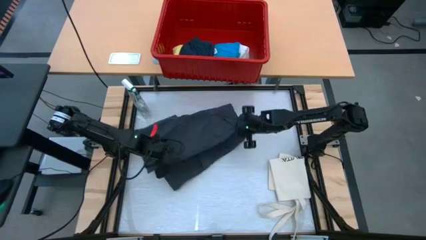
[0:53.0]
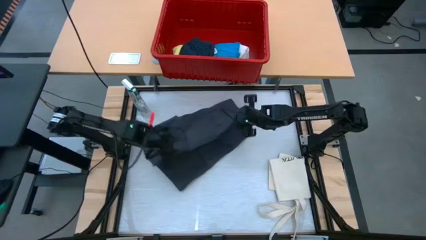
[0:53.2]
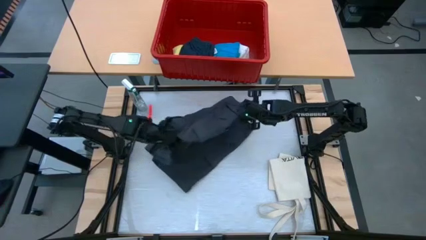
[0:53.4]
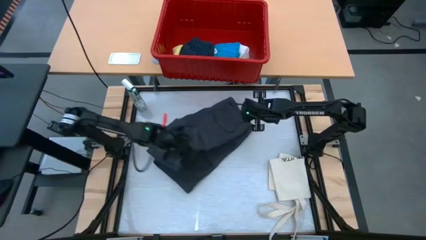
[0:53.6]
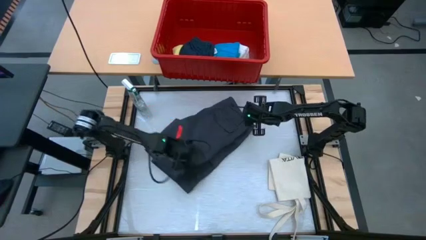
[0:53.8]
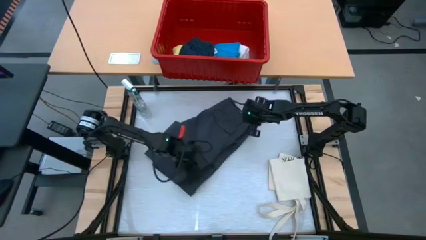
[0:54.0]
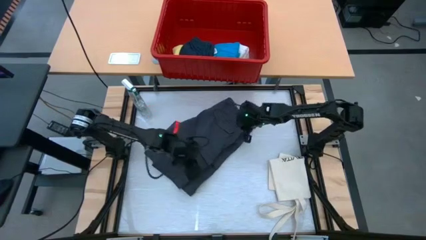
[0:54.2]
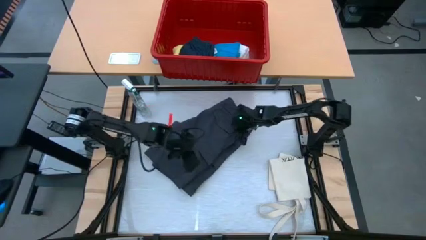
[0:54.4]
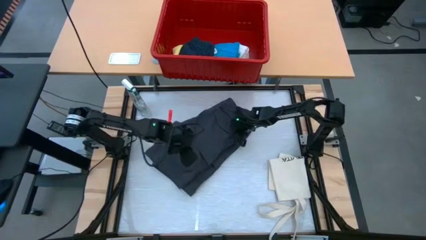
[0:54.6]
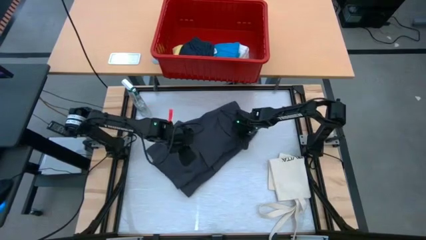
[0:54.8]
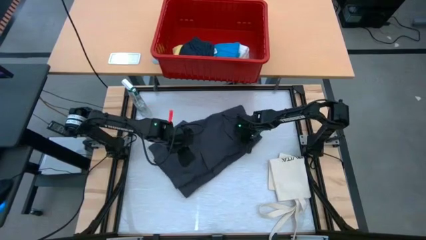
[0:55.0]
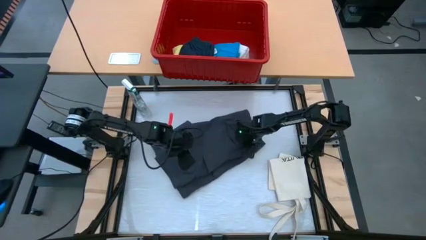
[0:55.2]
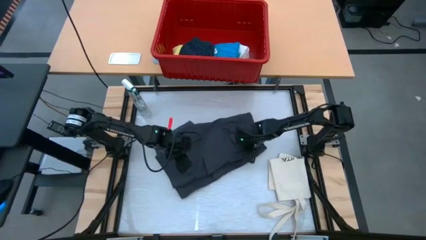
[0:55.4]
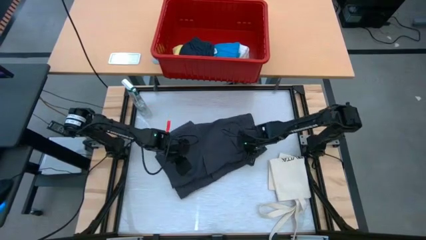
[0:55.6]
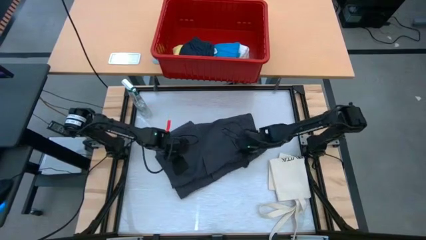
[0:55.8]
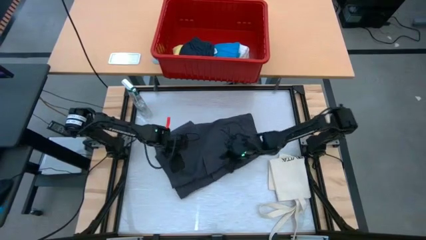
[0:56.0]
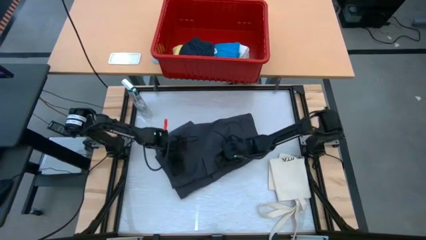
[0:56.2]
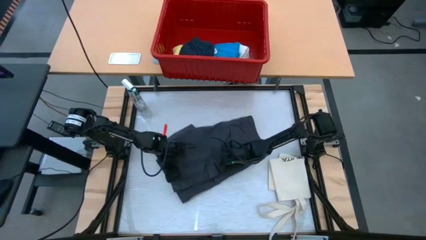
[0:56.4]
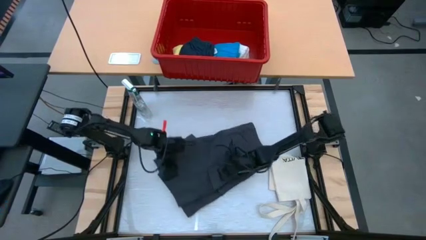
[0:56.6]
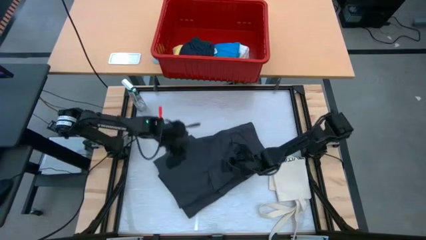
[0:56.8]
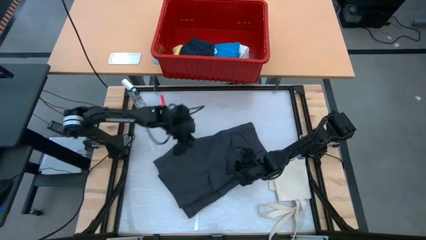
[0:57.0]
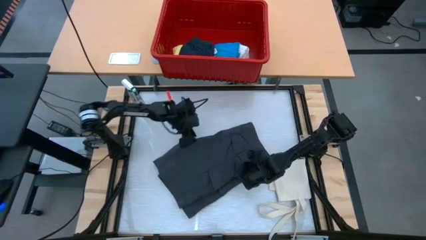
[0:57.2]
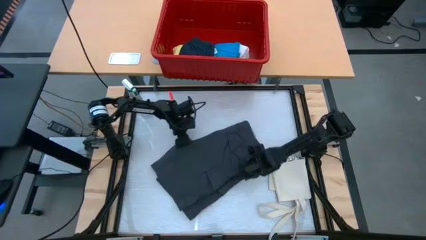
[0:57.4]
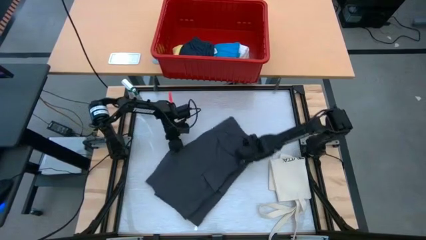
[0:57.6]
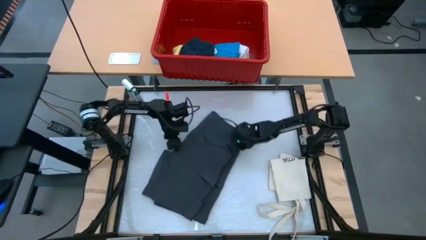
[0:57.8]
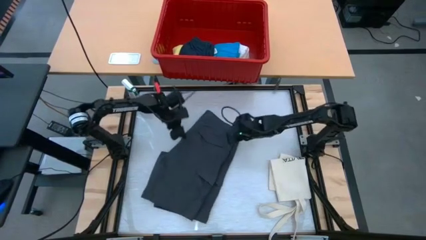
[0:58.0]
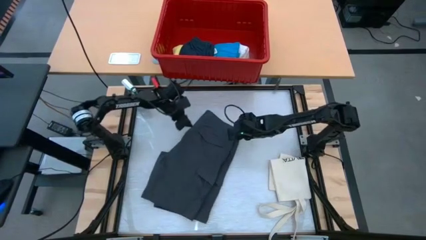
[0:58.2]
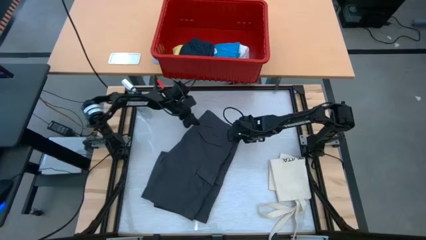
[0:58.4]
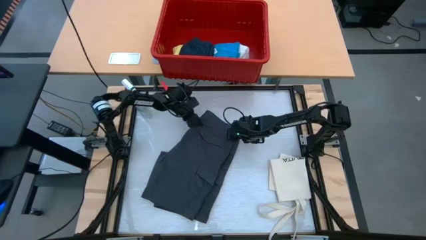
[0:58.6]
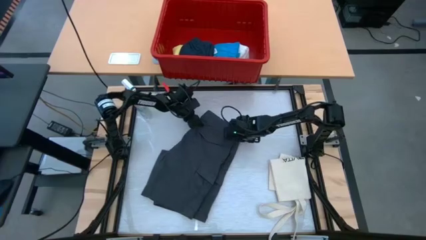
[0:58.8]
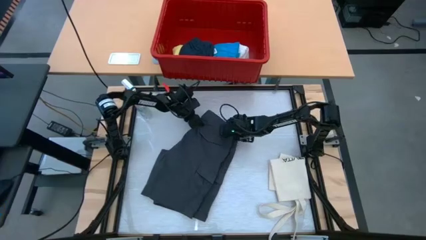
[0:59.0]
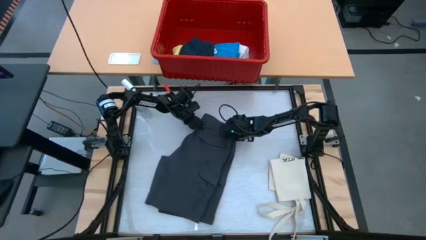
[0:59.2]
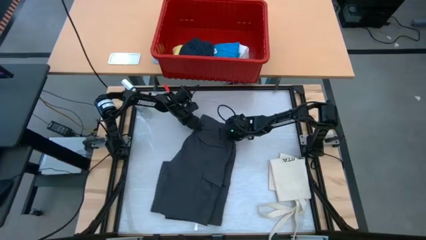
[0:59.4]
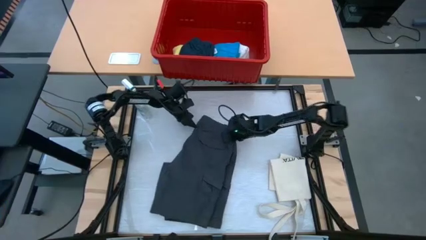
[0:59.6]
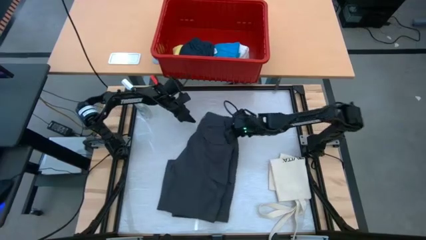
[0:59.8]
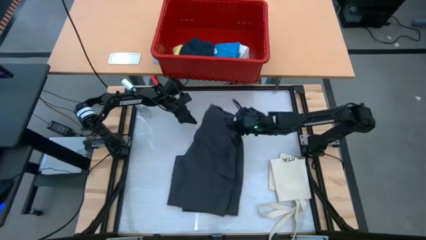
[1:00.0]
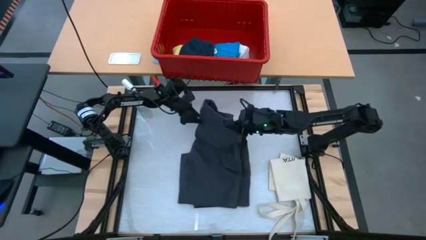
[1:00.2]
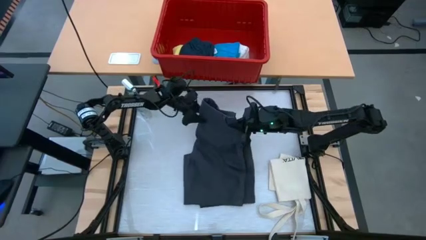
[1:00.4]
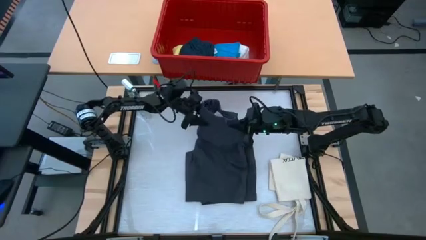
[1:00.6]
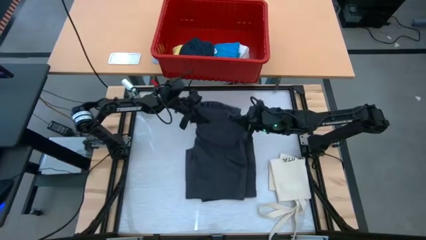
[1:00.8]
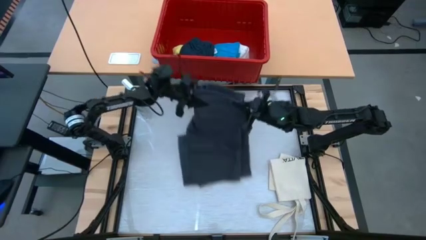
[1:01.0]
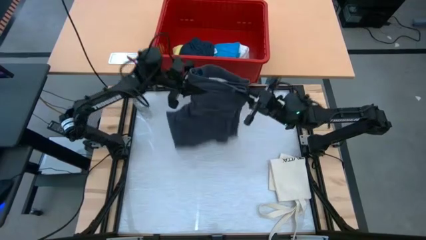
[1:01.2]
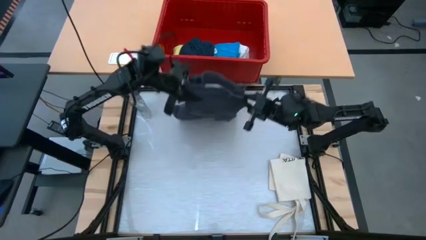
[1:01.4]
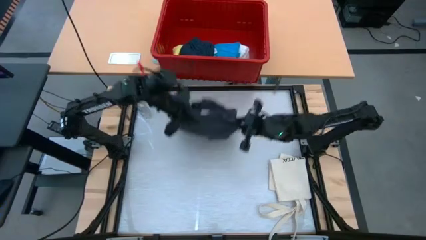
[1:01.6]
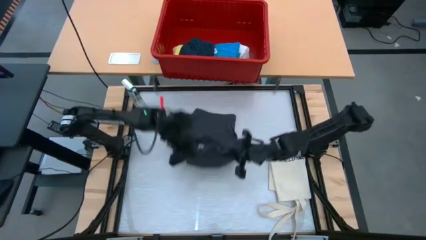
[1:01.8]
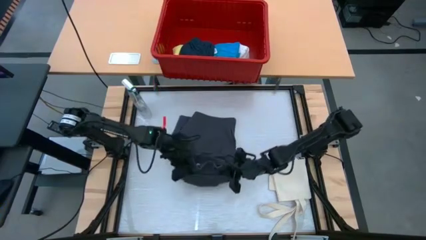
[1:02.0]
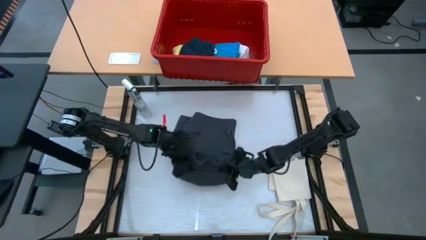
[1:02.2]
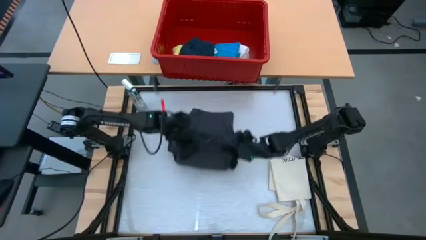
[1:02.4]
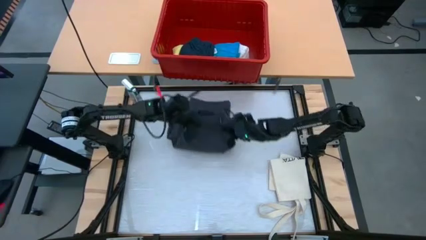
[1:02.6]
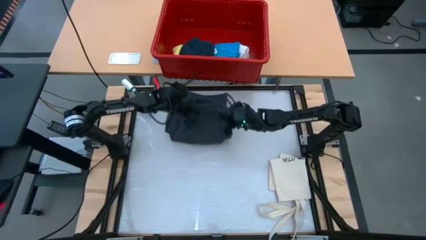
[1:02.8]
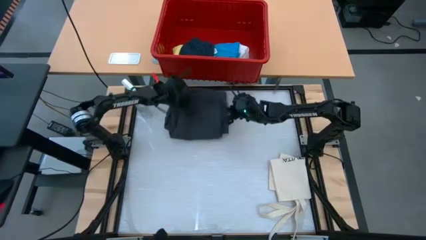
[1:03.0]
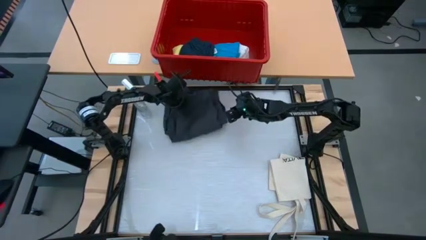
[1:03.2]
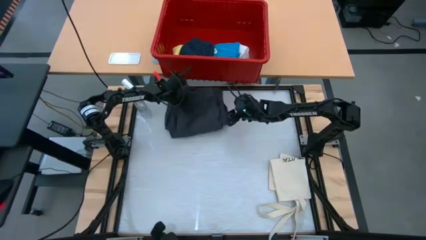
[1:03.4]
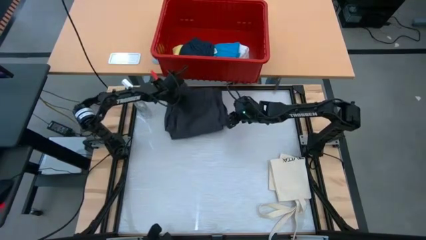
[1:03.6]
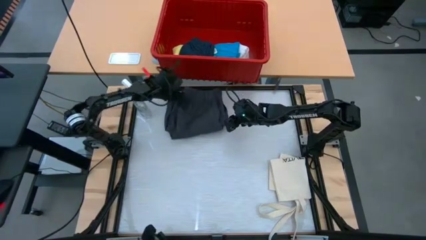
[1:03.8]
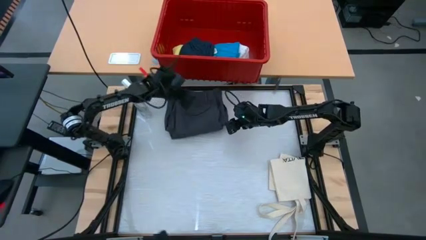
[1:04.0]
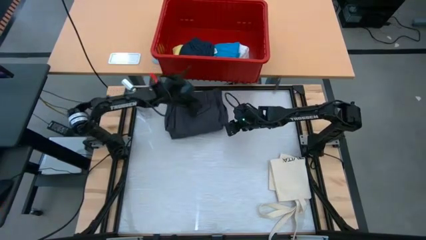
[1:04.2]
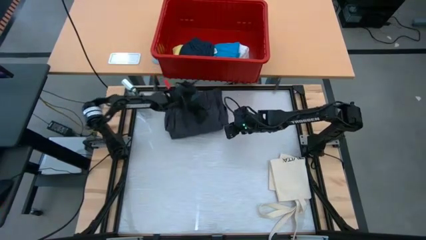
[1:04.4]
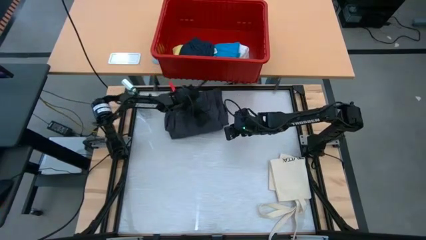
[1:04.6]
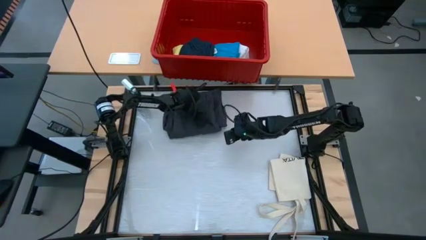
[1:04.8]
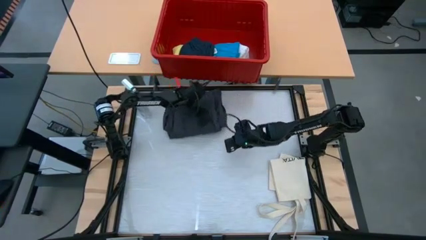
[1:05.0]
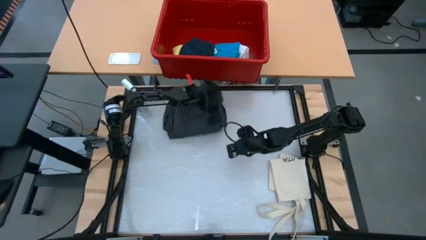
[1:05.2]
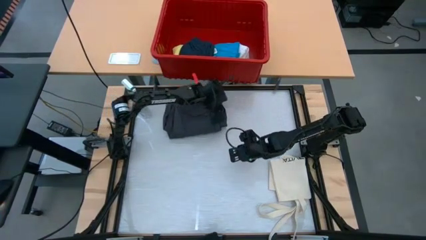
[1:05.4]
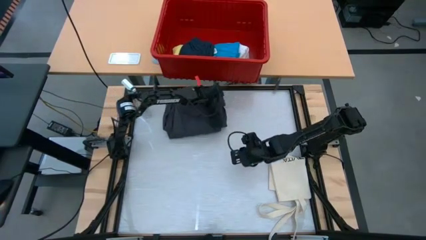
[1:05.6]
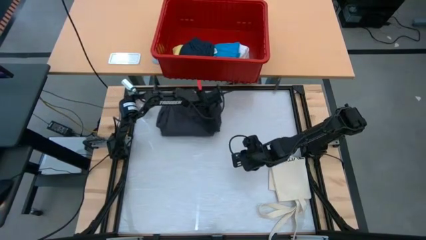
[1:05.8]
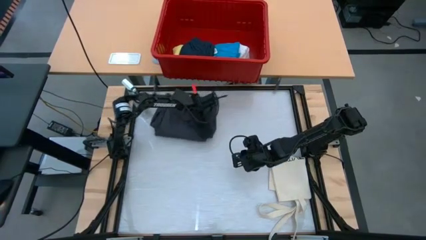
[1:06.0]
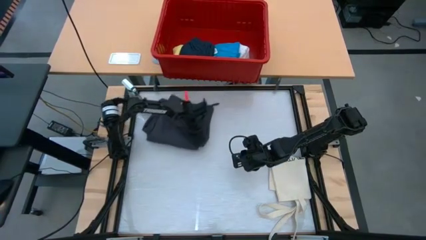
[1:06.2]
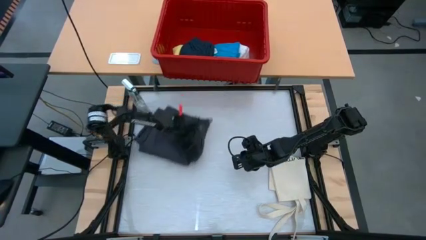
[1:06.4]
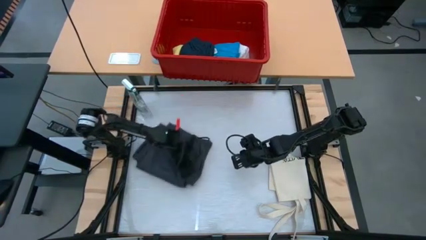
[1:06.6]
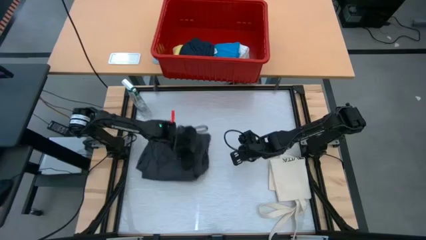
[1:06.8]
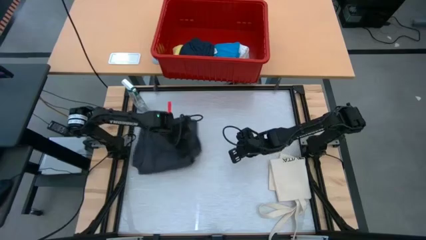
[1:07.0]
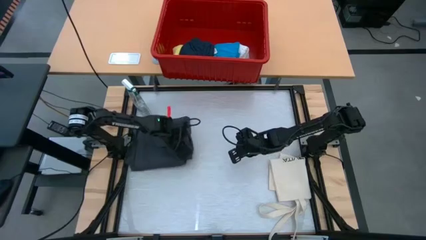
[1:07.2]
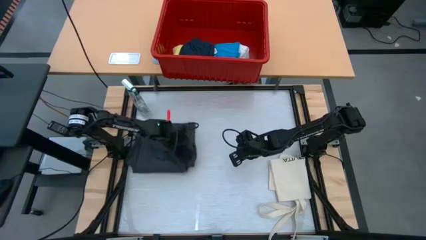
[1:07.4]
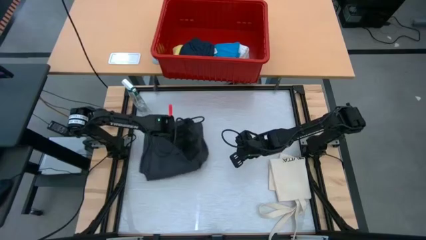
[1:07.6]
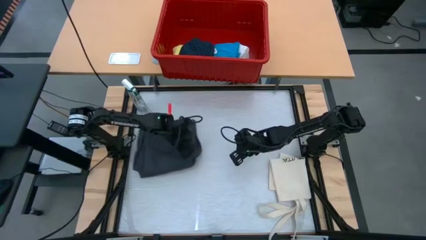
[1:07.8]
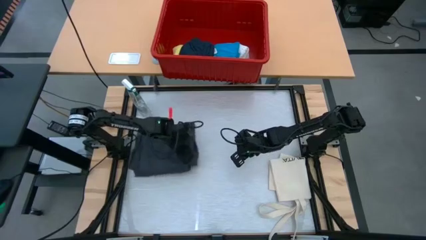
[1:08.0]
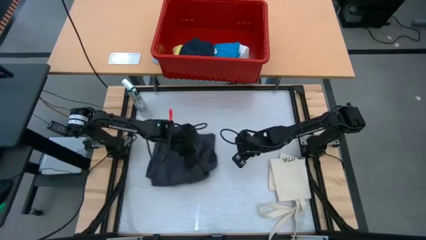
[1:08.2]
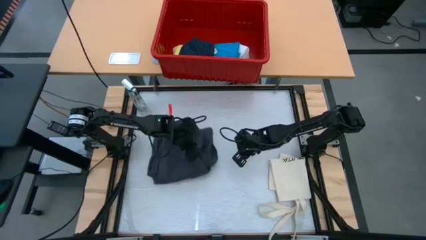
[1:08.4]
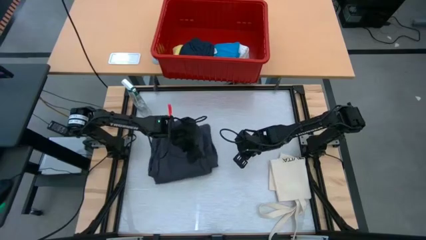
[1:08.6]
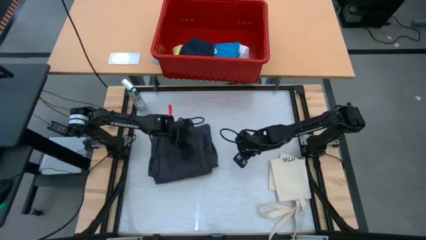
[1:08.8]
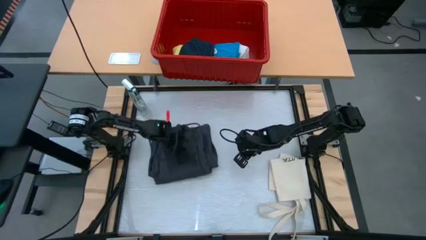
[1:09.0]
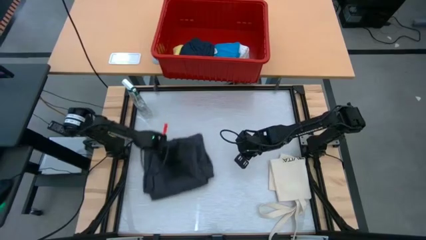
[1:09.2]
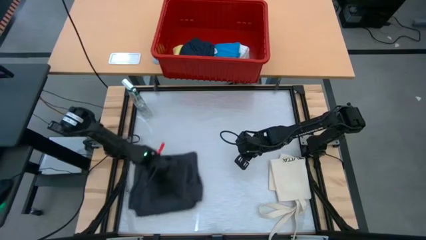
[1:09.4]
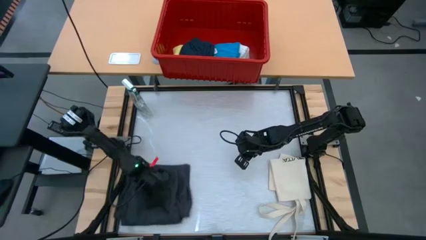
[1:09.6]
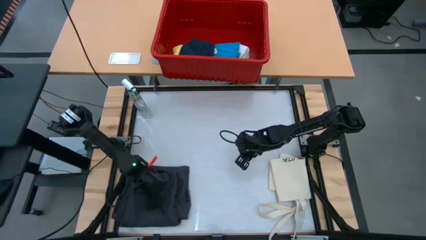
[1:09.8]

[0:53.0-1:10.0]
Task: Fold laundry
Fold the dark blue shorts
